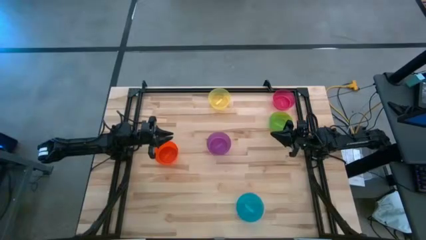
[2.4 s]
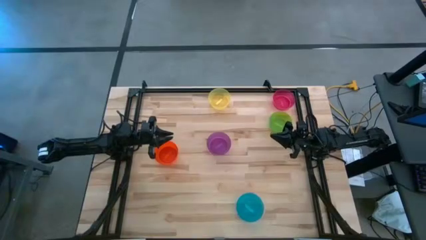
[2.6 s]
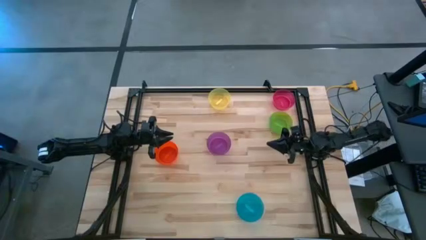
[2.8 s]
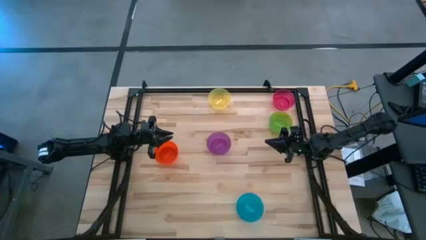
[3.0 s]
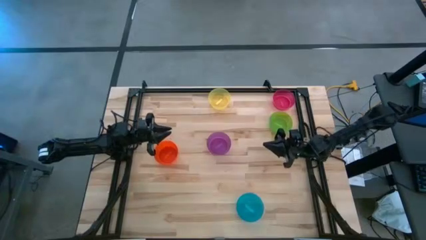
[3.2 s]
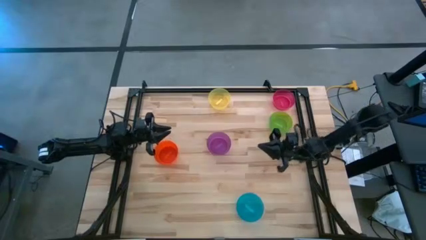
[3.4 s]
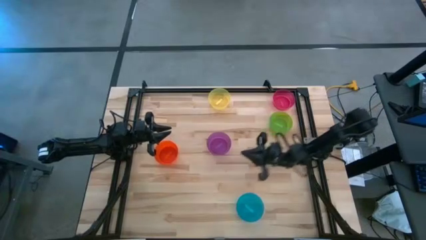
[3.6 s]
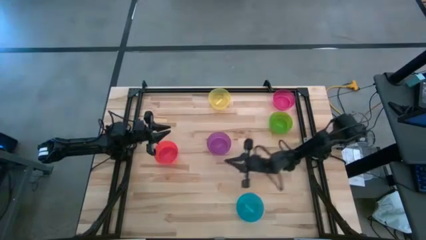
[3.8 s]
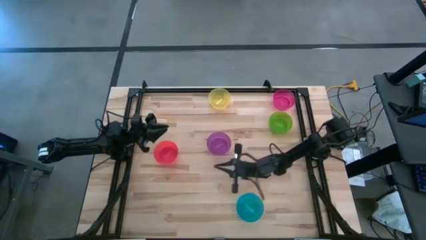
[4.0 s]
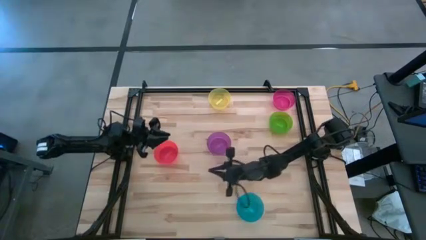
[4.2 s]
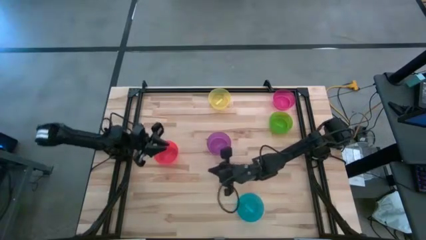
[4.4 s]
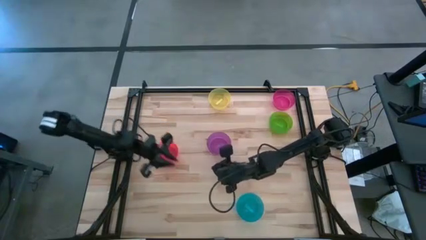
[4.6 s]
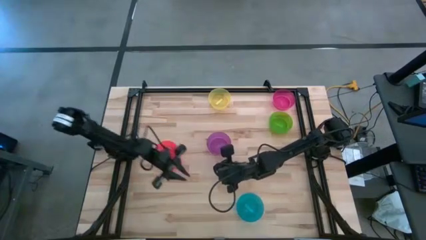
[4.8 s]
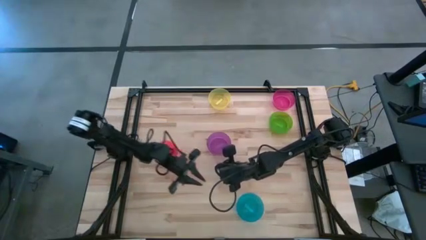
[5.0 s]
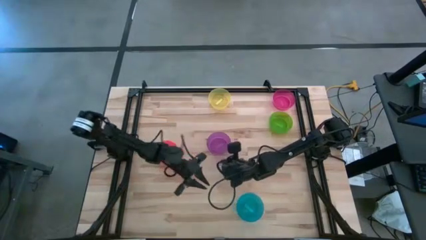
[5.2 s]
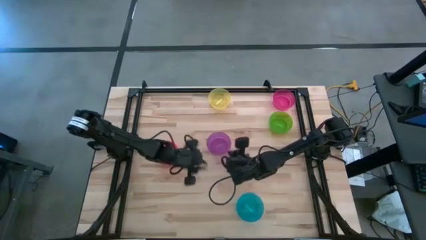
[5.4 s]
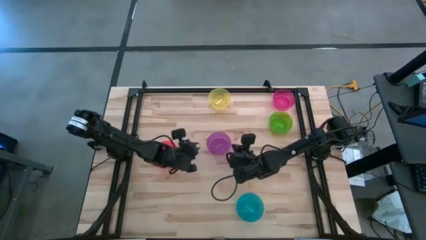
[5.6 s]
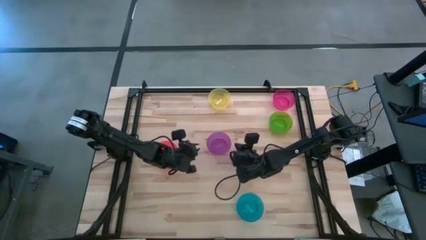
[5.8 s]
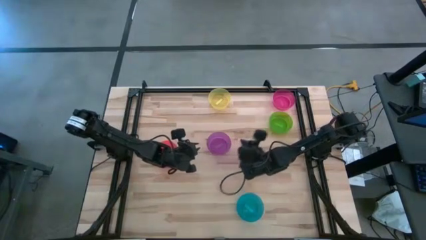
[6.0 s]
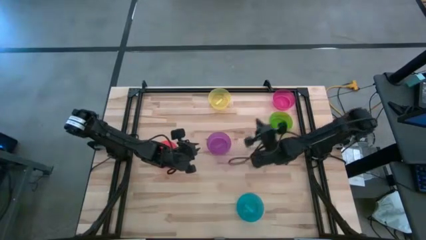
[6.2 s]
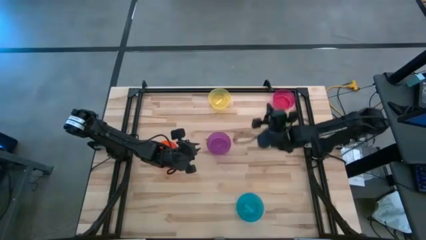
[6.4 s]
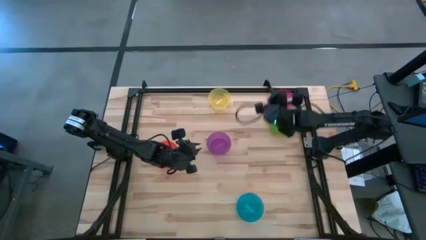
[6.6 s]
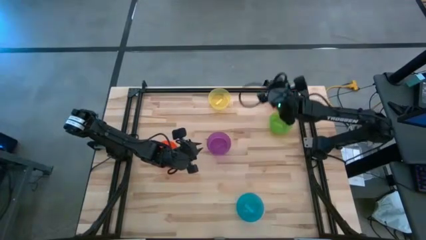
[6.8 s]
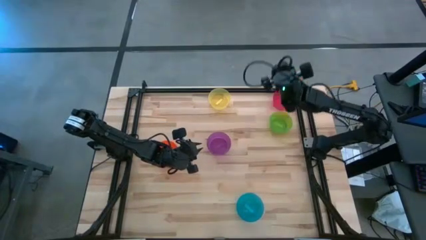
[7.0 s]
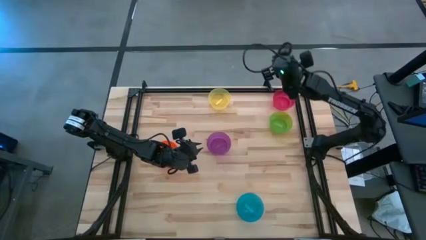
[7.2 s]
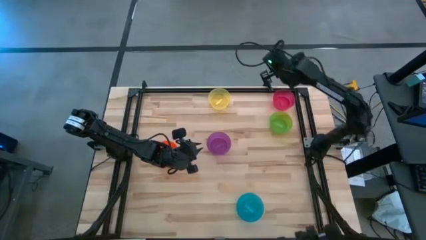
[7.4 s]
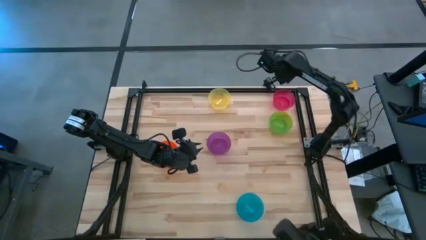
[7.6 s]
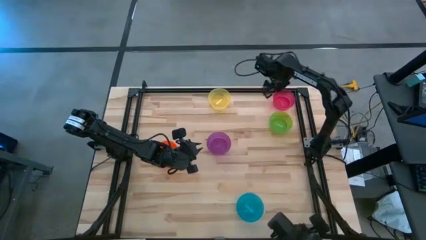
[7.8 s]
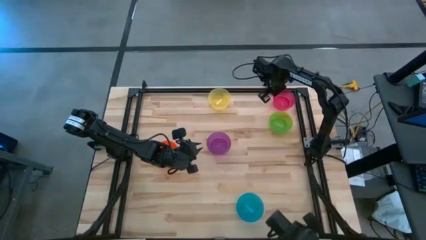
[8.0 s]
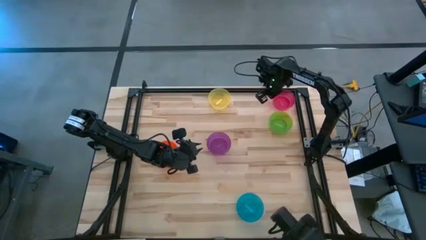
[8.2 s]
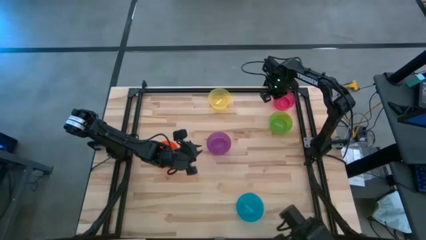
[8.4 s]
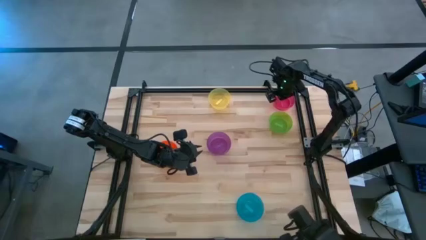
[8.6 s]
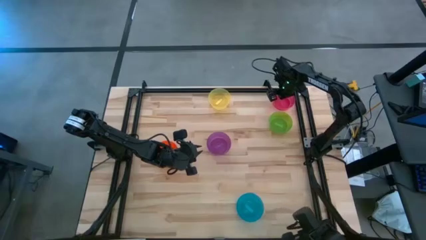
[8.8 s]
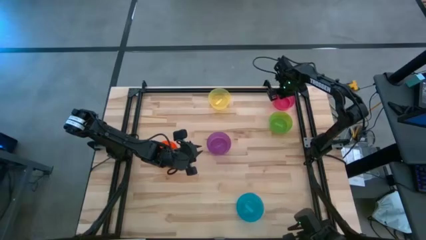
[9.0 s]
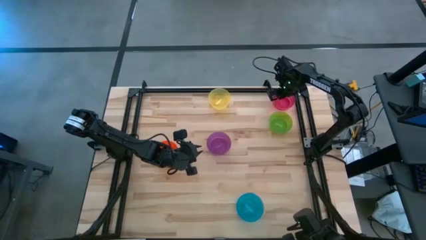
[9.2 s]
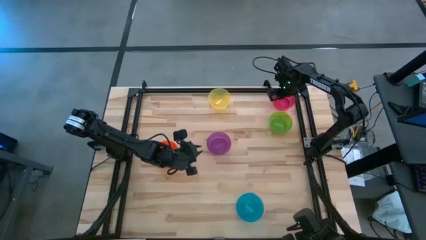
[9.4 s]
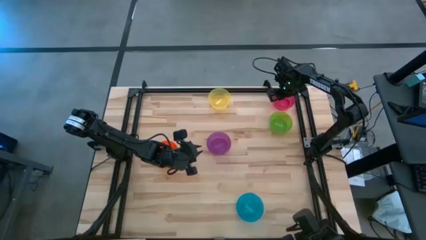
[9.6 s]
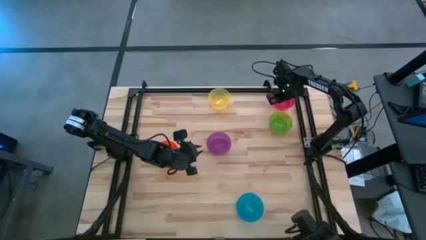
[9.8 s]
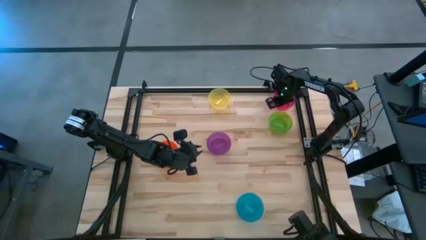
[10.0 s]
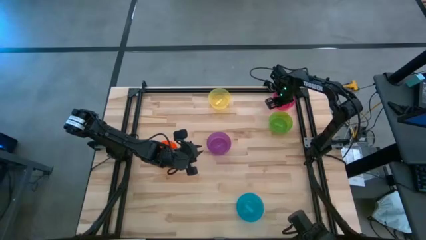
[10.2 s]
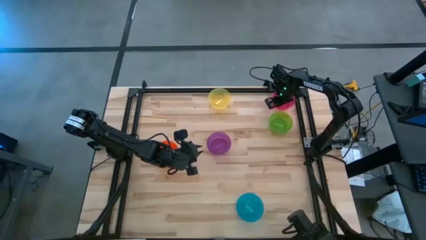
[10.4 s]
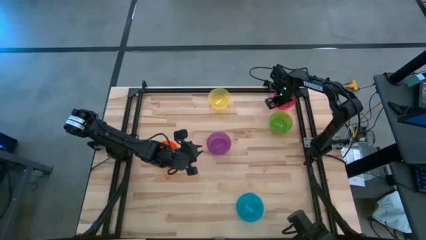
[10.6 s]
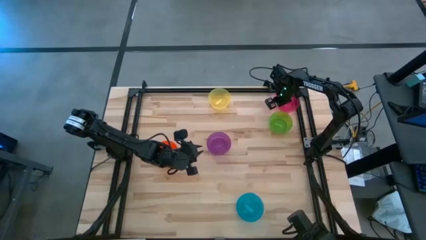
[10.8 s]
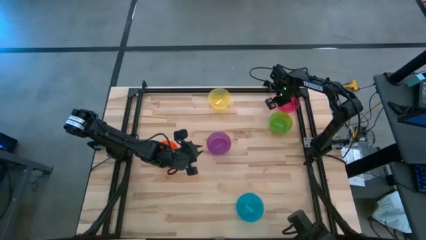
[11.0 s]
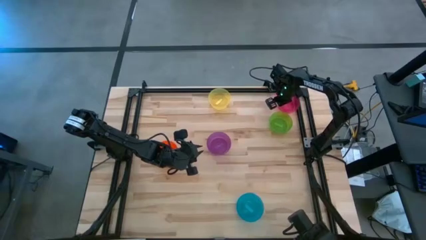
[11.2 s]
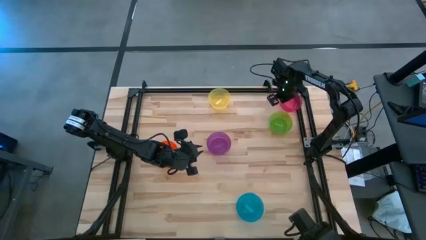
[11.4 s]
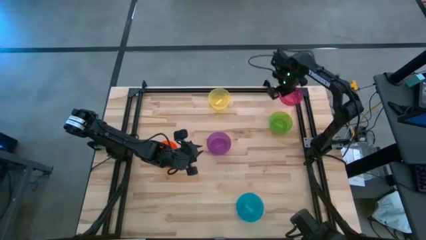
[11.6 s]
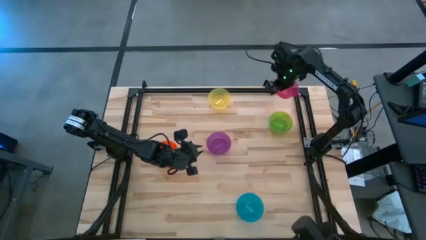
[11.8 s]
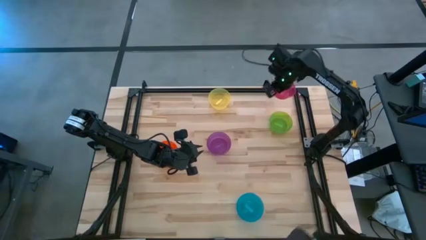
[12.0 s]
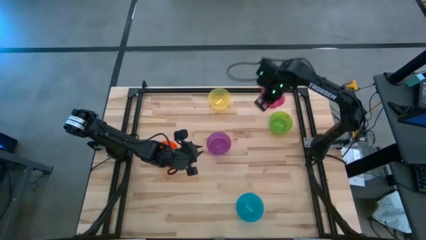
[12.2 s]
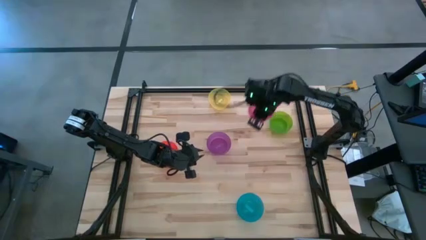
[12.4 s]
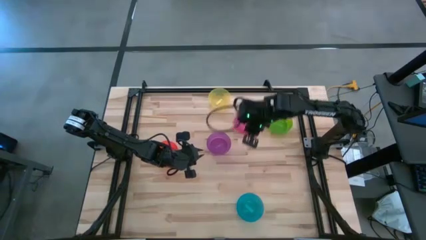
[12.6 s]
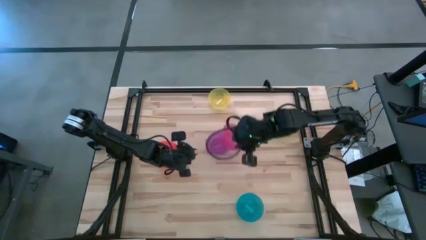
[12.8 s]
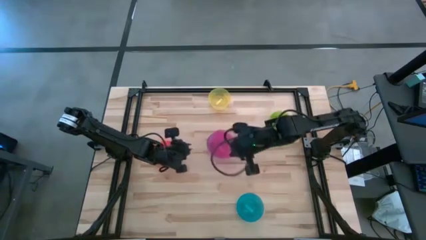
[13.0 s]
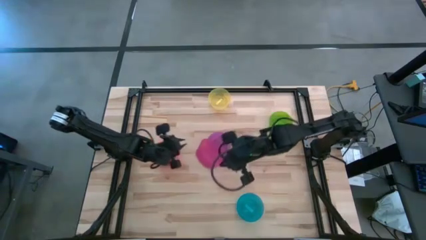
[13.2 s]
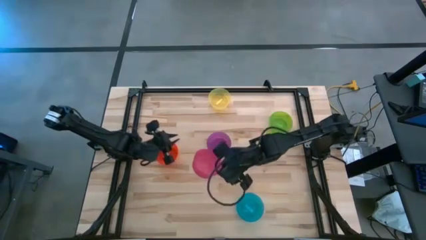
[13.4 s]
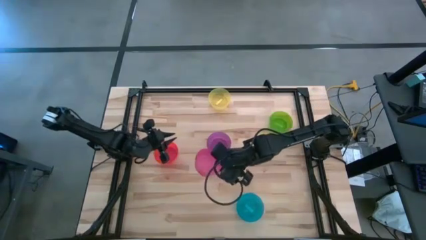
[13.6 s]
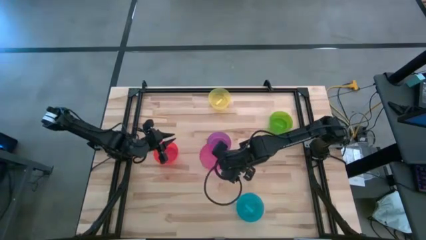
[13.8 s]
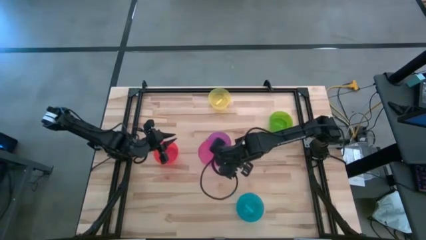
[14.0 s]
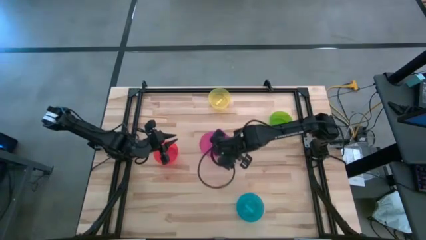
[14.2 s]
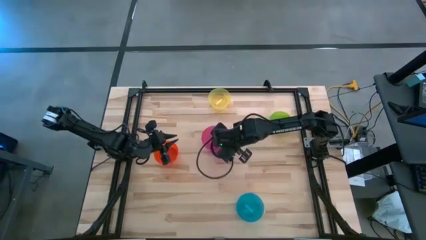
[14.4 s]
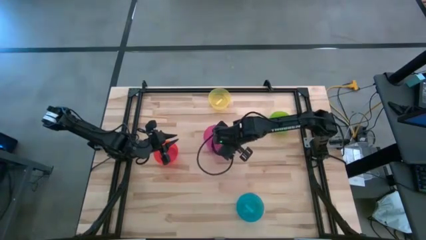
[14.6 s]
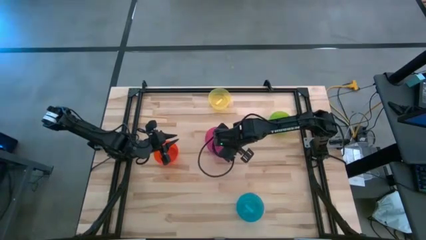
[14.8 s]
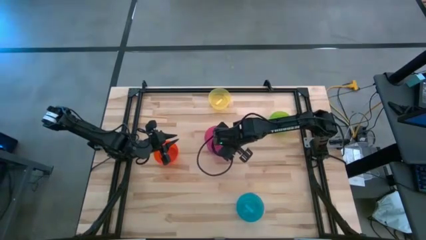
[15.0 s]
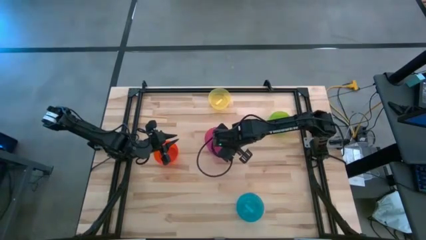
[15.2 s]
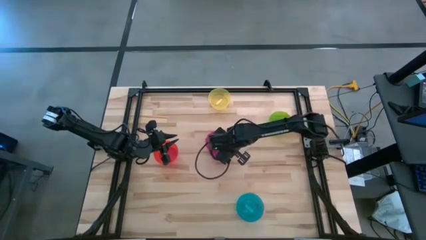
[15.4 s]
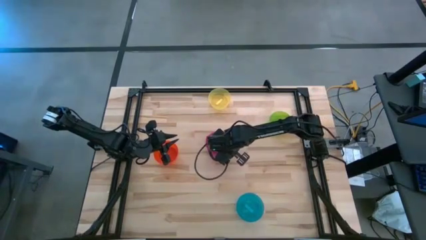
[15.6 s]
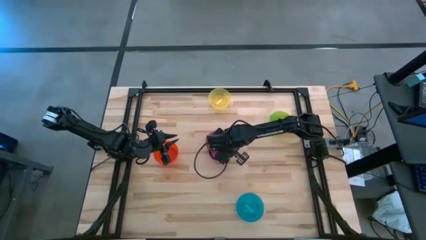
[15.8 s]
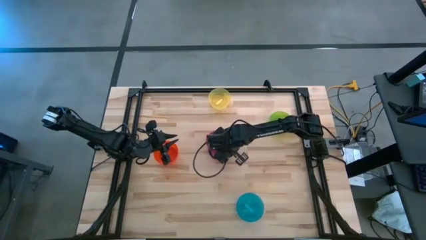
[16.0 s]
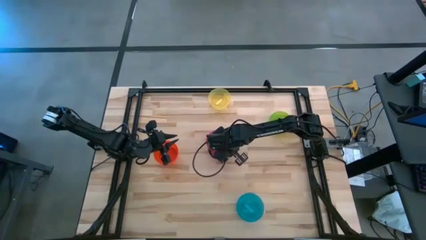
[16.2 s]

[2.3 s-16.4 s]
Task: Nest bowls inside each other
Stack the pink bowl on top of the purple bowl
